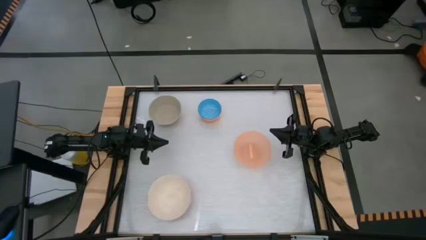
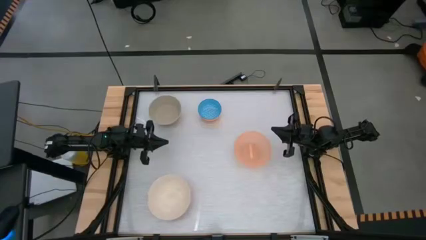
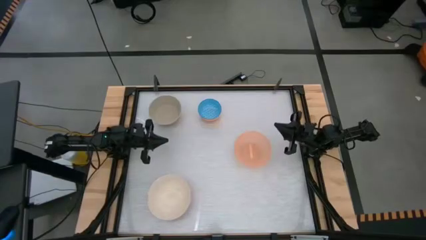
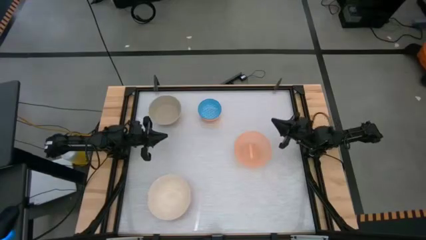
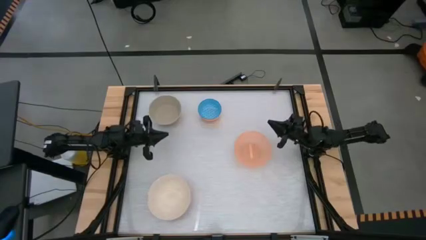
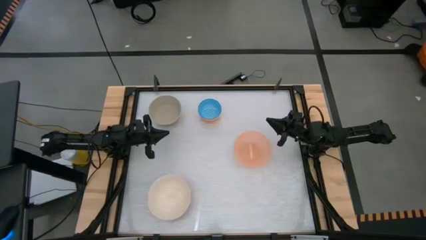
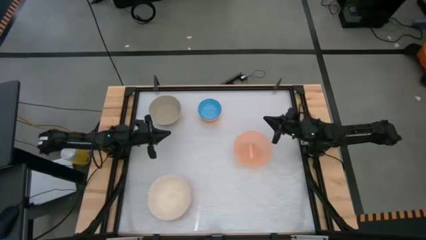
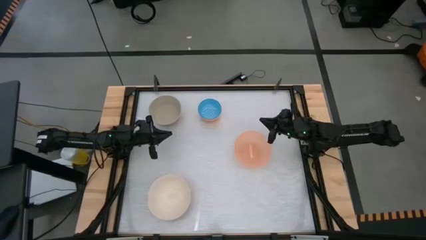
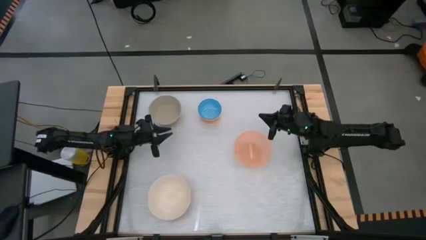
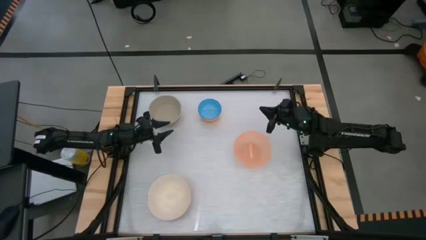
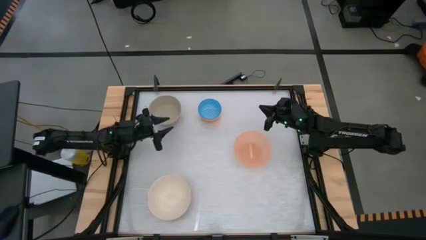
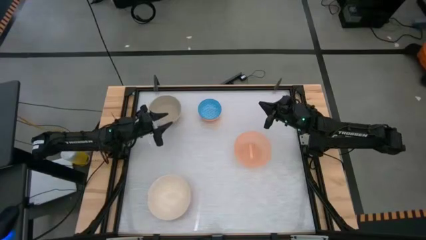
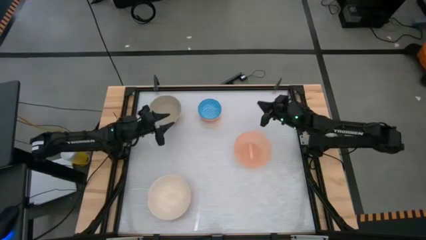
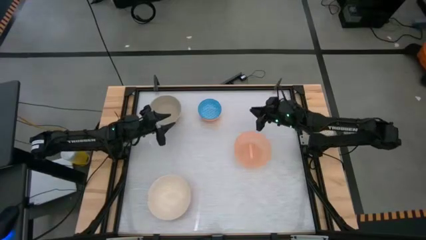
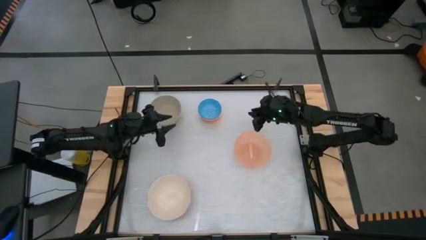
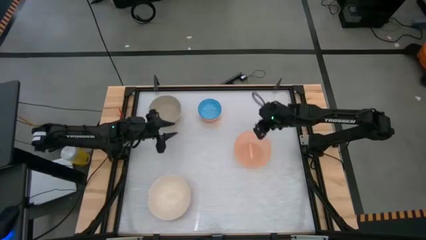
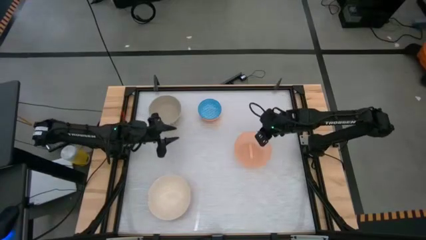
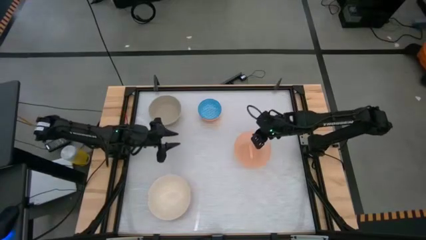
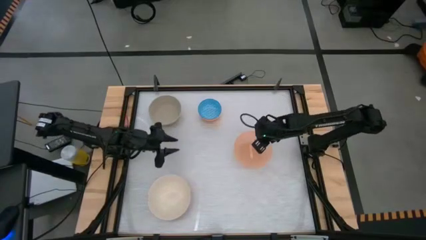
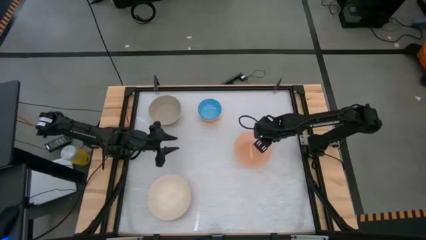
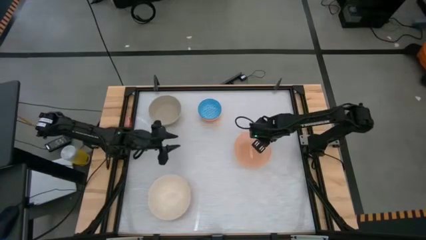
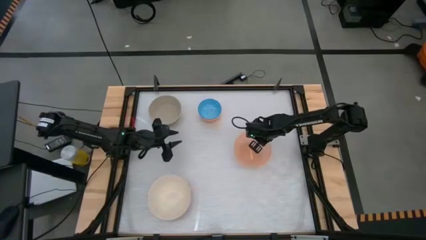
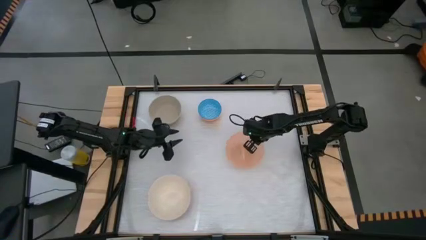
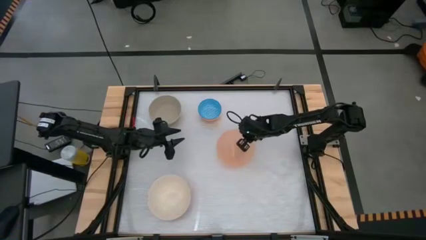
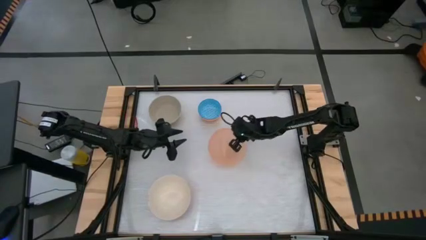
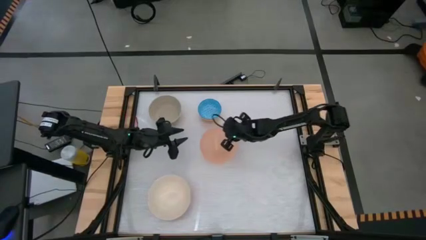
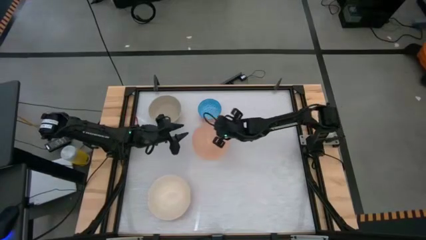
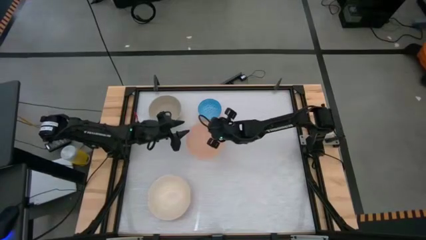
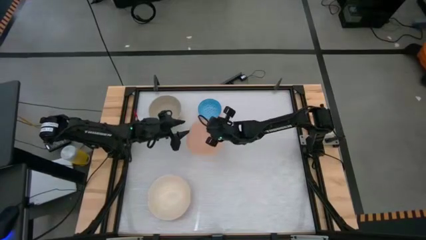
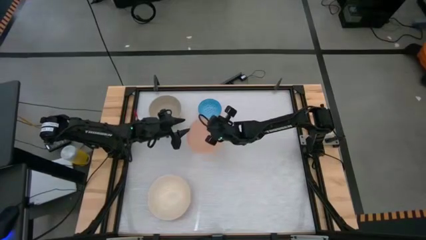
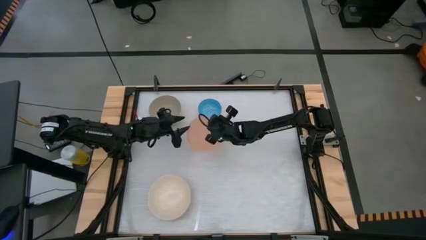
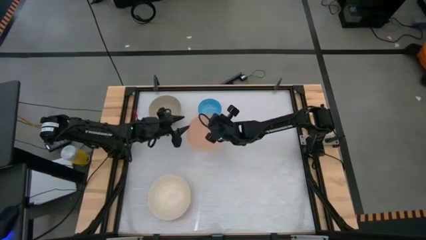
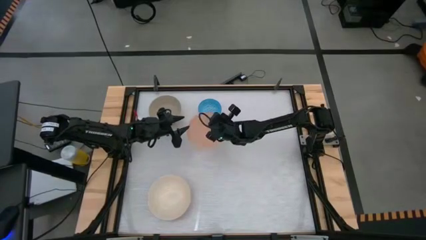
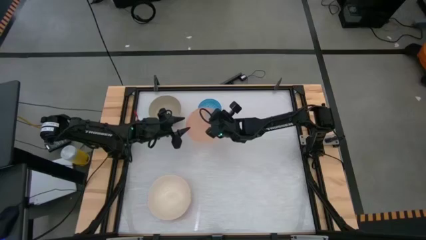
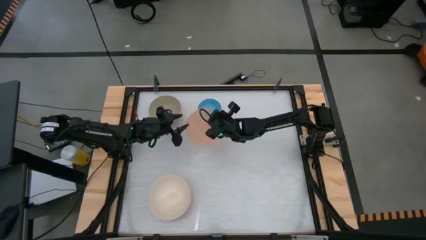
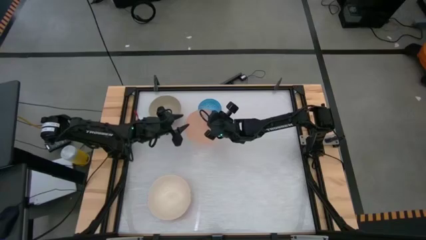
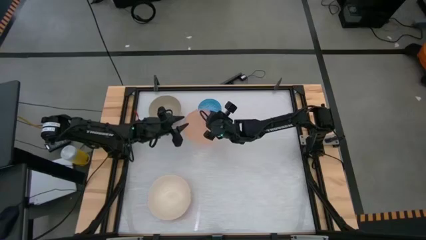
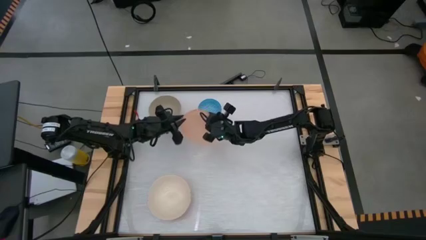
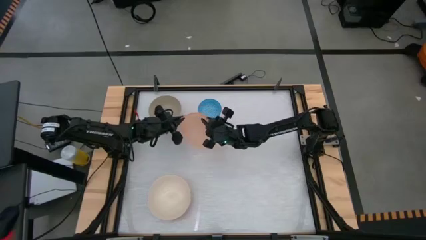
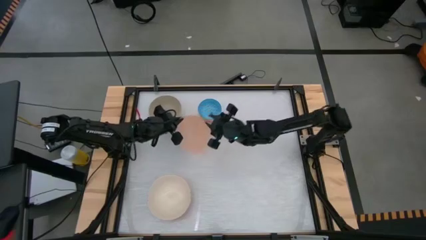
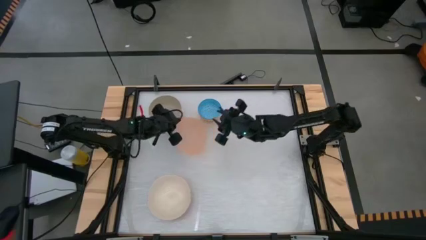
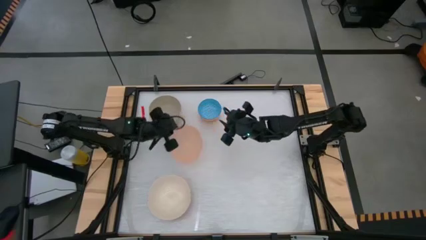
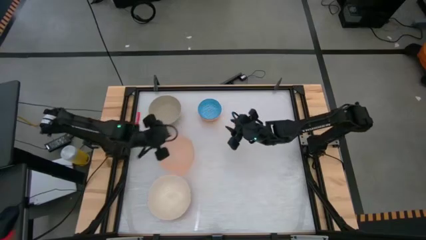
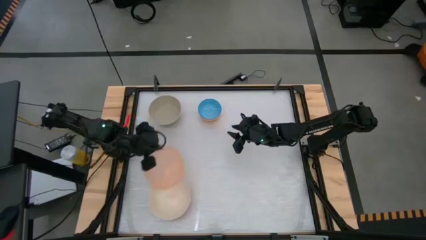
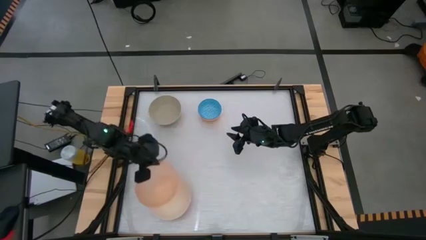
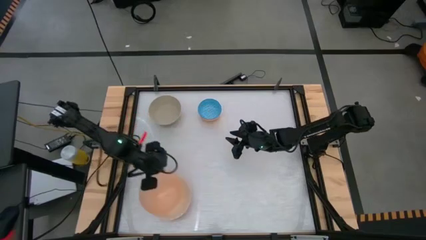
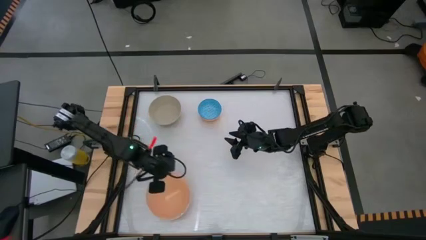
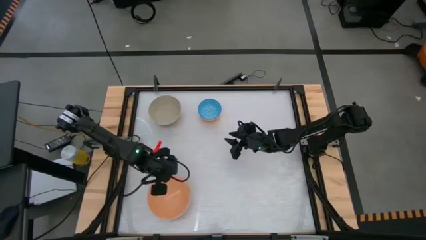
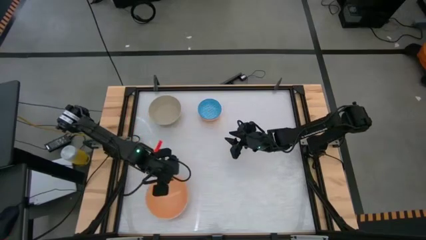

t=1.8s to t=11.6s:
Stack the orange bowl on top of the white bowl

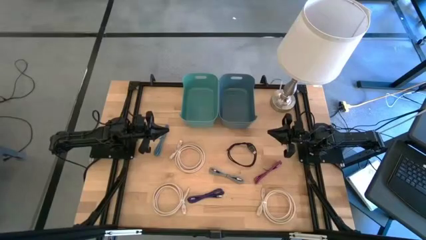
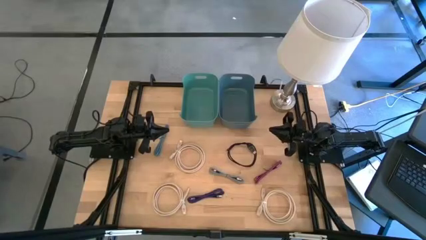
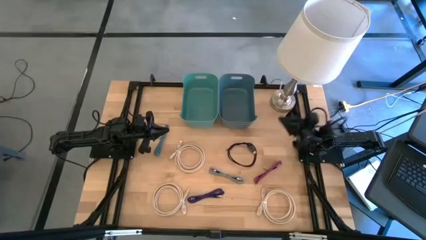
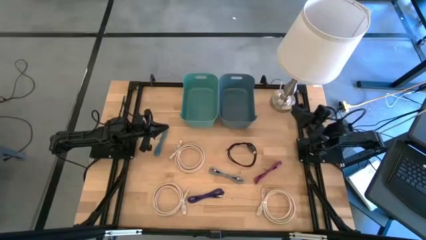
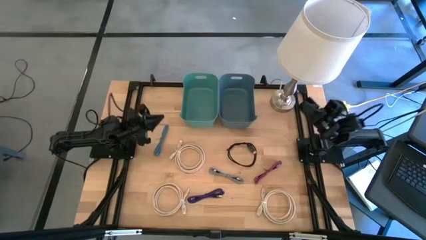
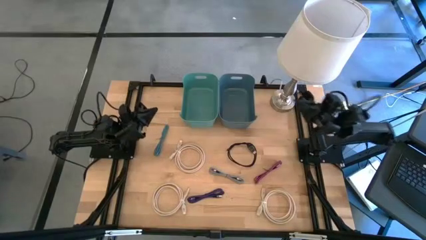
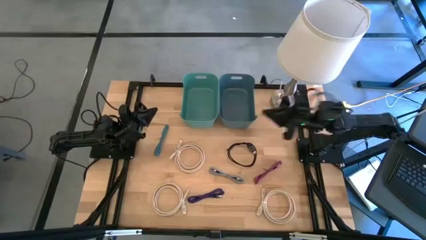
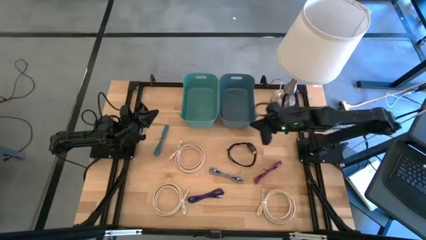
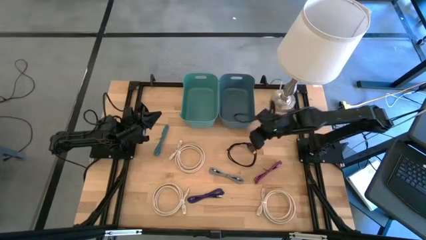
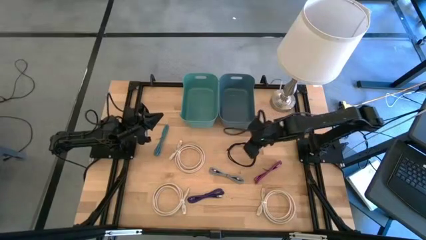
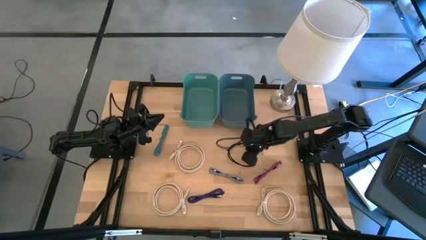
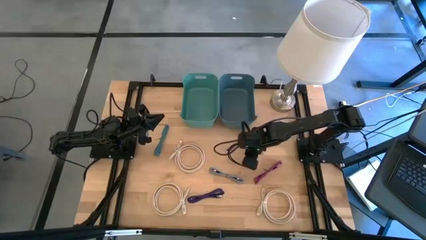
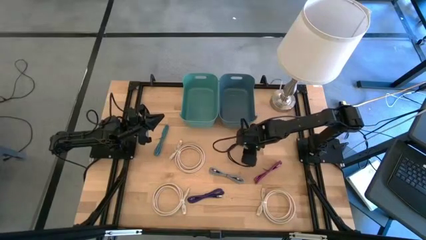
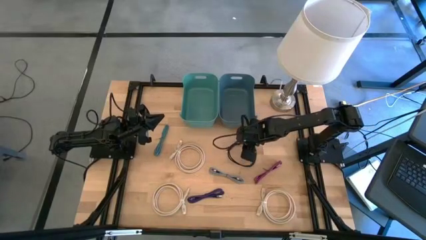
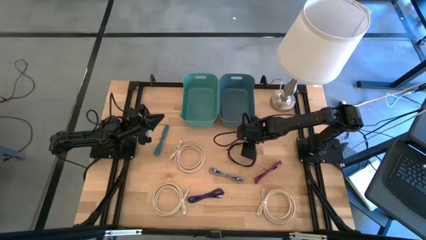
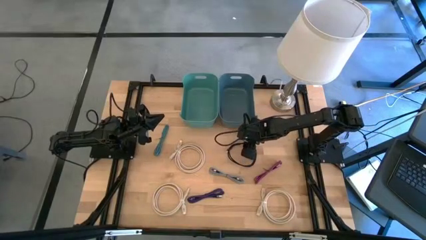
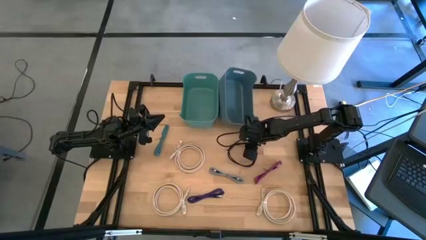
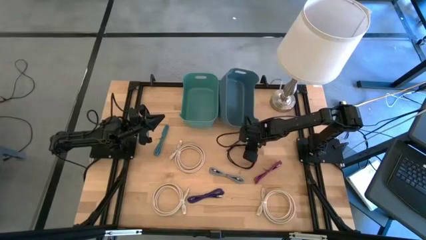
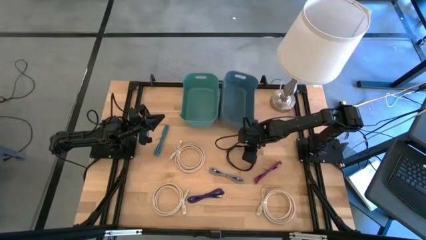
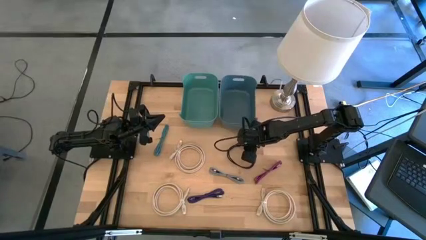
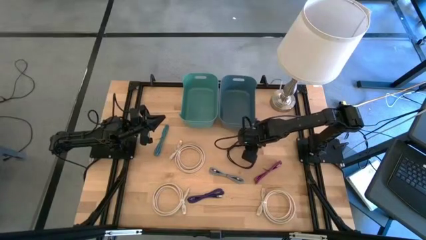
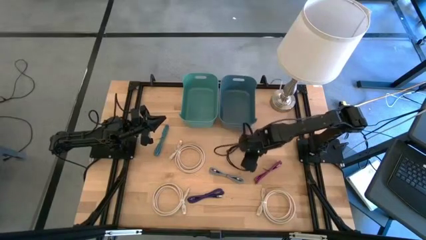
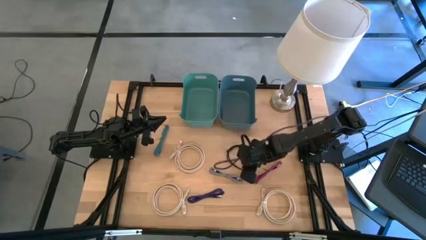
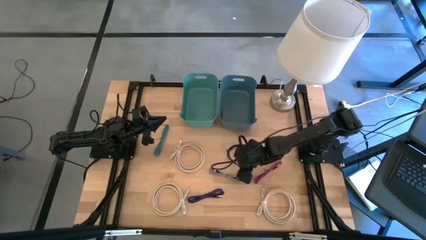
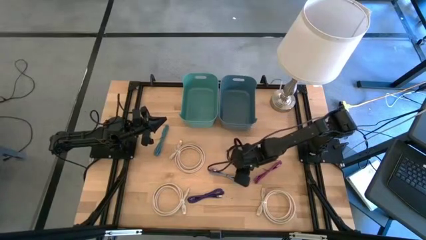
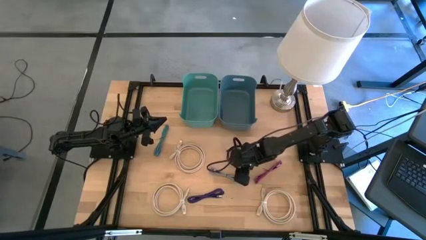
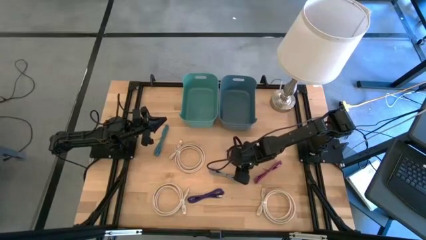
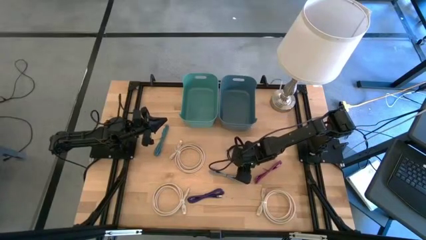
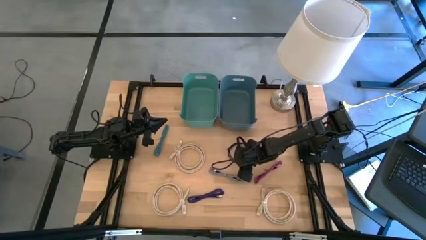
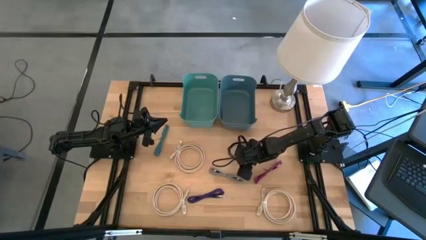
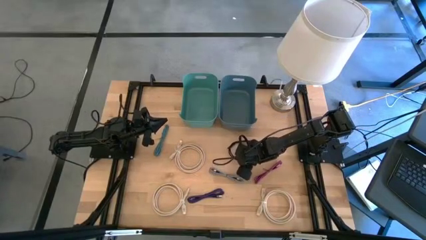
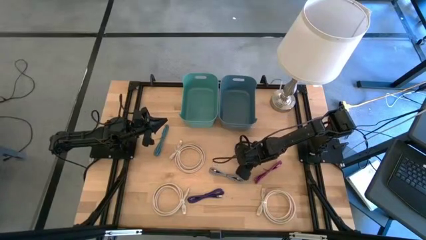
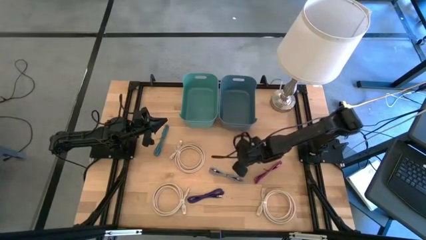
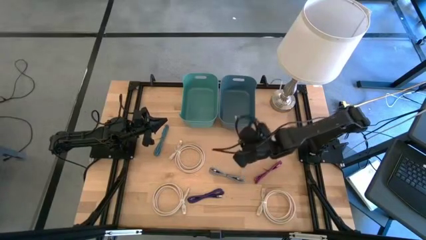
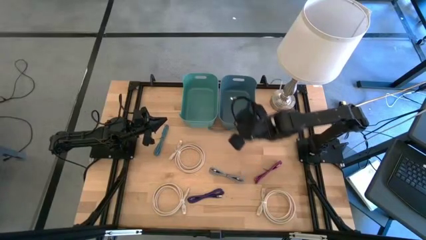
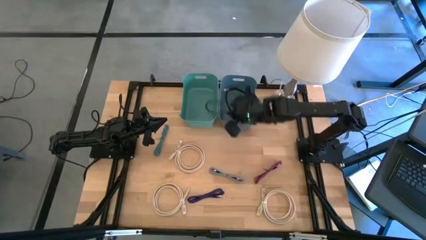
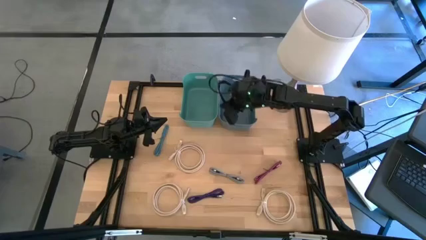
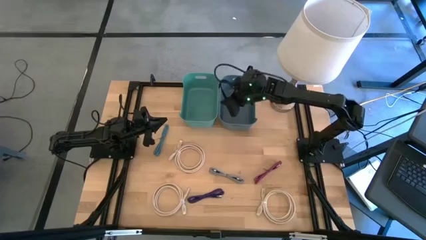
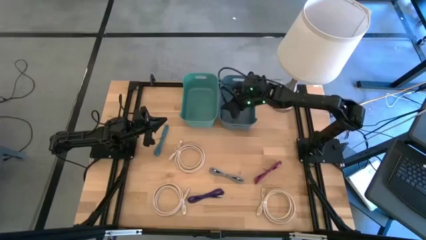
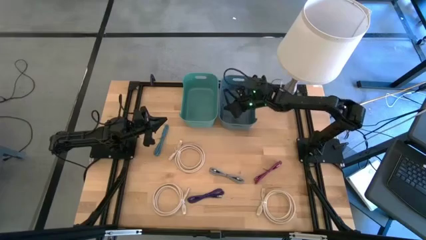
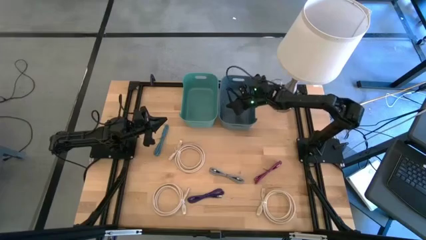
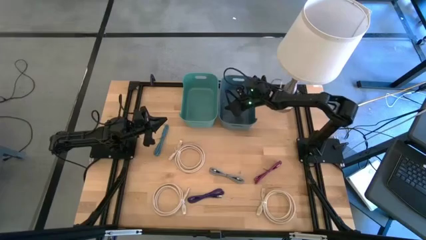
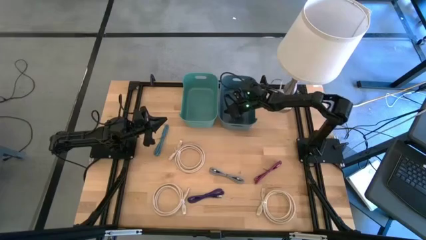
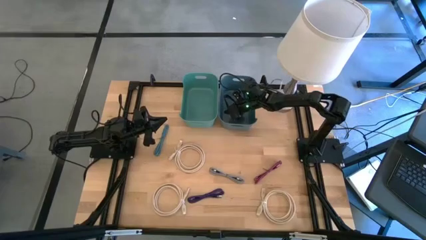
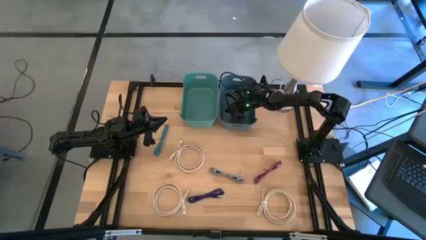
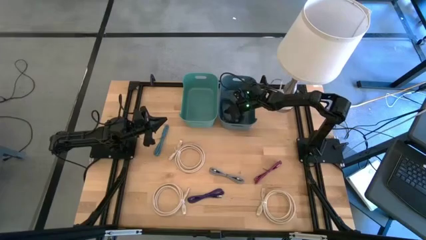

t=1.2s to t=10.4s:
Put the black HDMI into the blue bin
